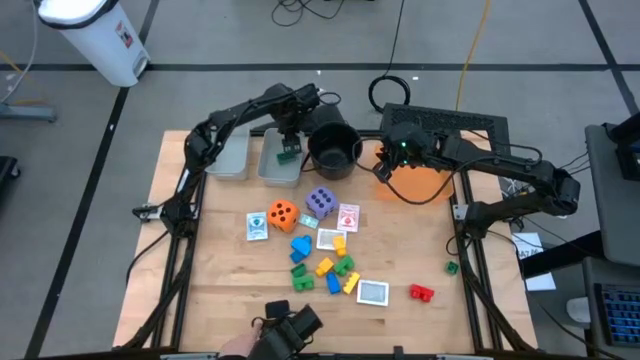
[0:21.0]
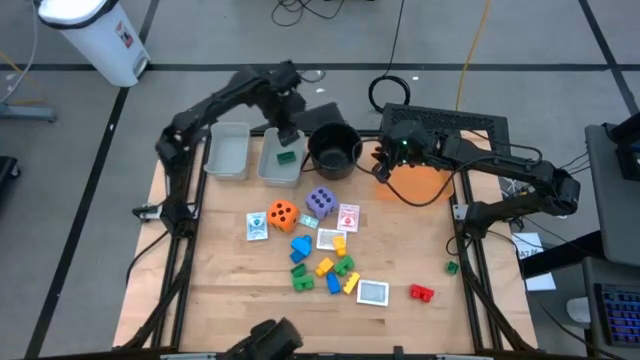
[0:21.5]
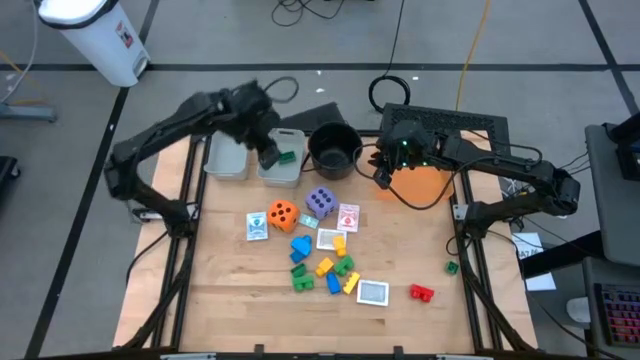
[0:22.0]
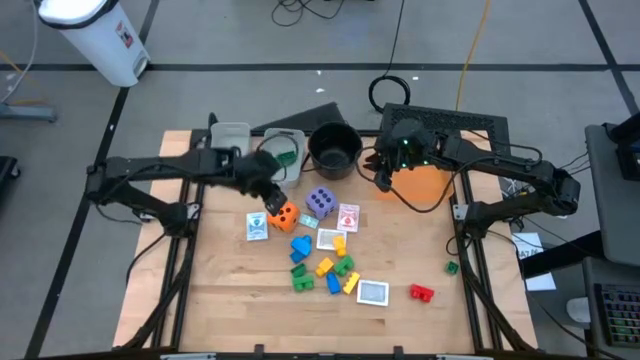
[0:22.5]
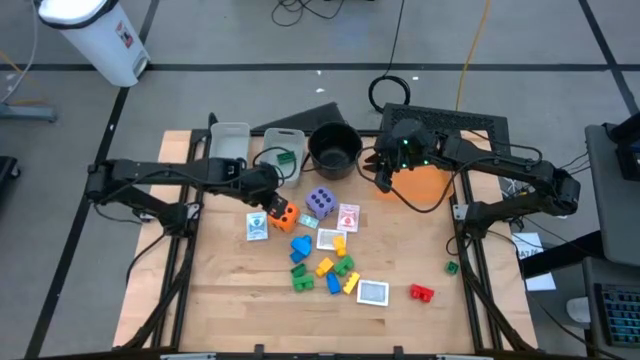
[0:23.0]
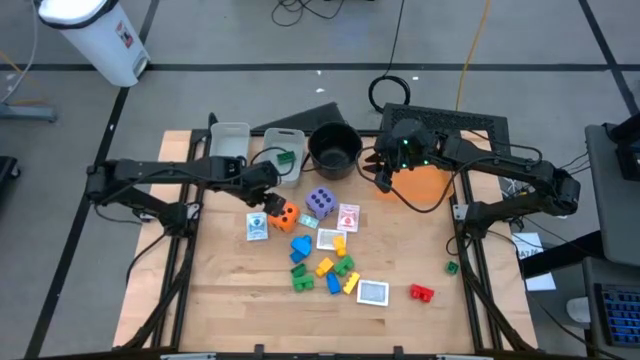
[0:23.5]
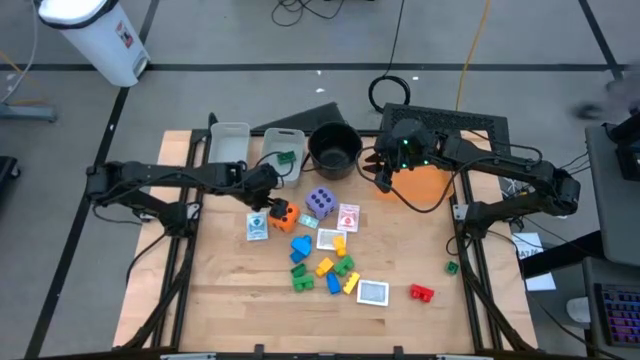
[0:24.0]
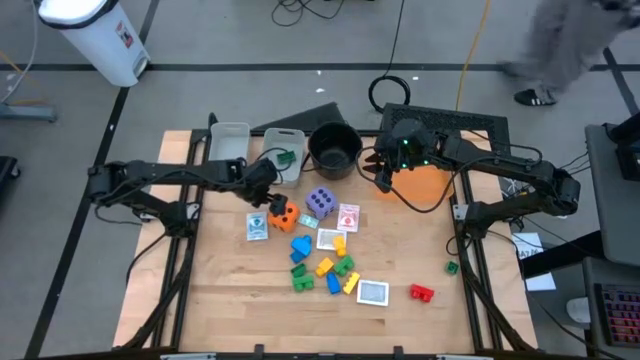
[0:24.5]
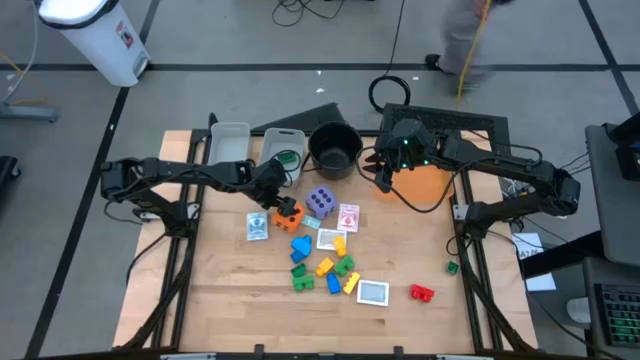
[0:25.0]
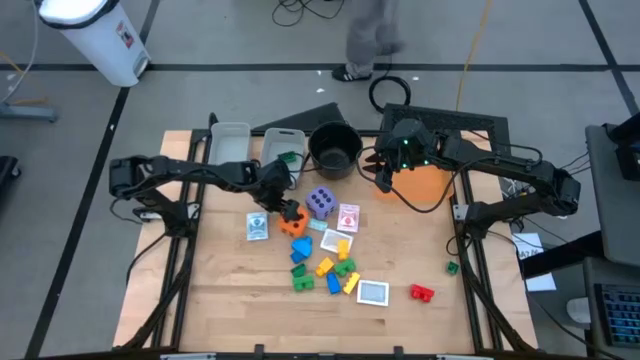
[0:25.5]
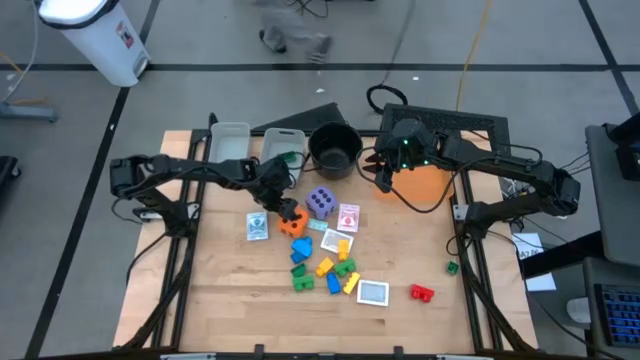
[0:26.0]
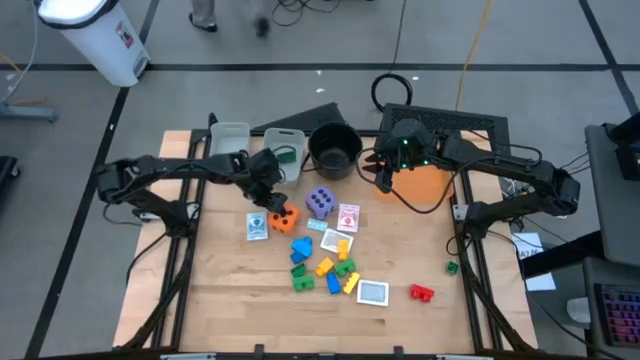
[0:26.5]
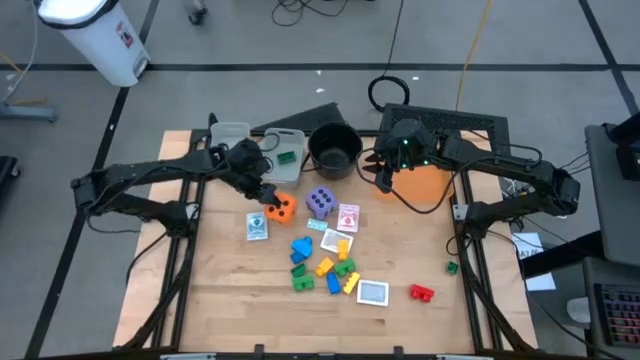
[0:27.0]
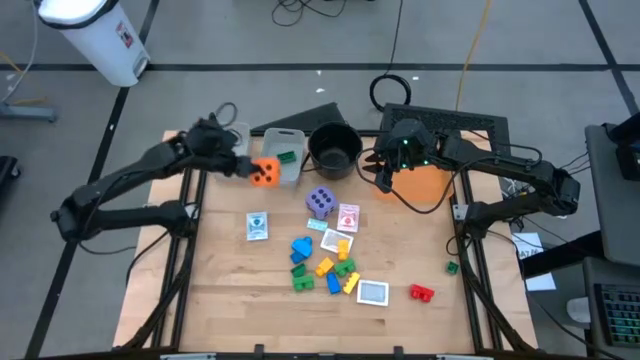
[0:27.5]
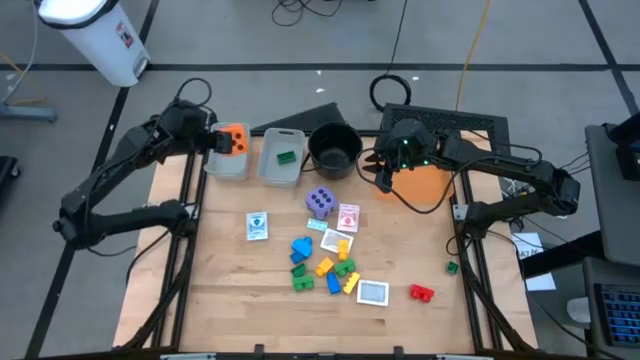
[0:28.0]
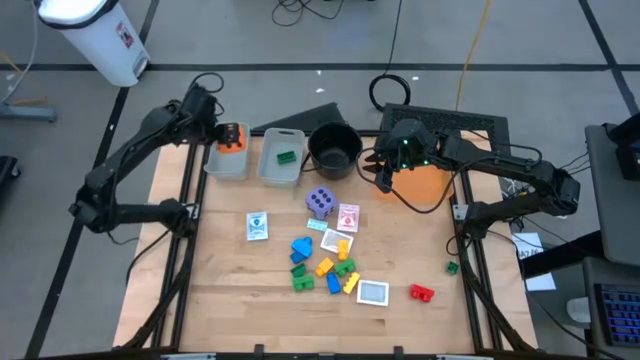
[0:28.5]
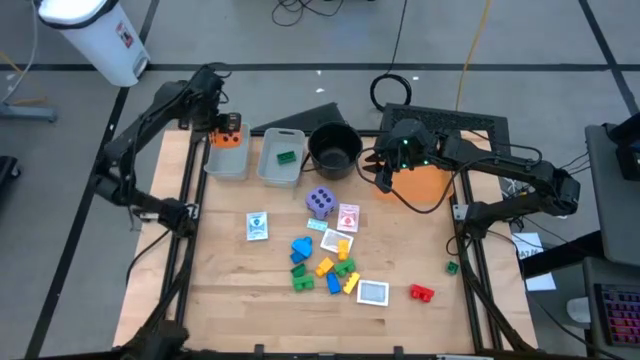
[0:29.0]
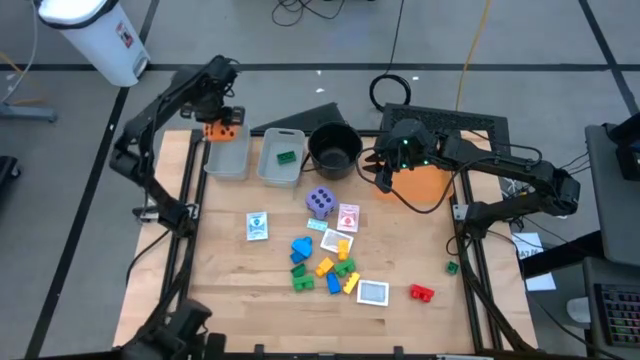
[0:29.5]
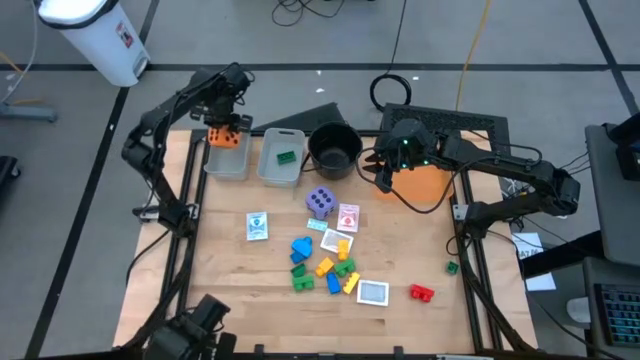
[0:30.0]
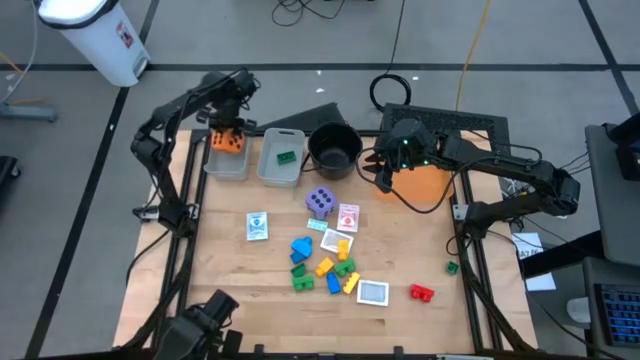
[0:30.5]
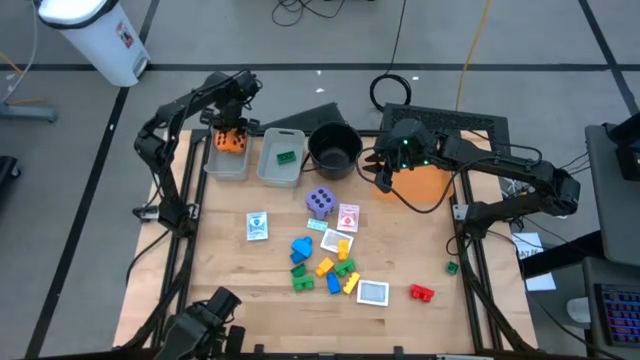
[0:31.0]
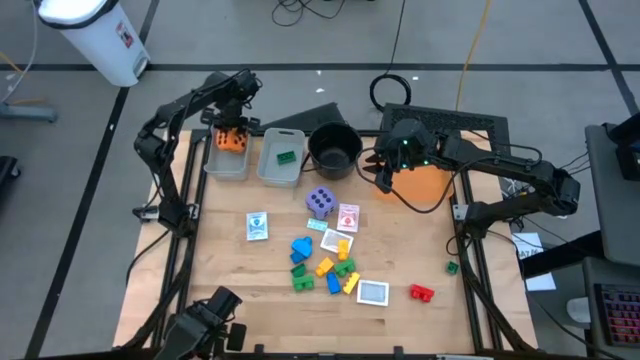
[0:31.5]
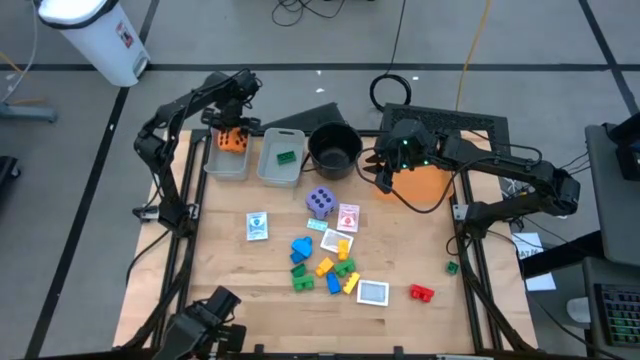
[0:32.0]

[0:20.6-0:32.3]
Task: Pick & Place Toys
Put the orange die into the left gray bin

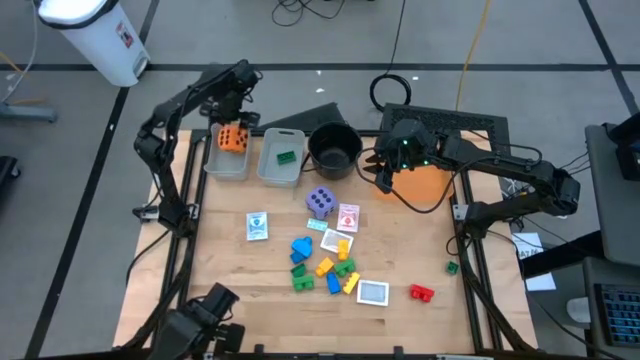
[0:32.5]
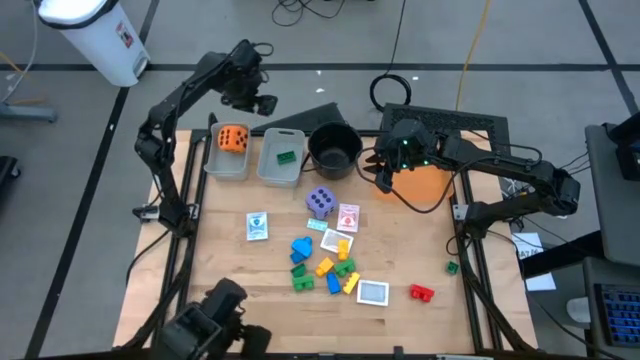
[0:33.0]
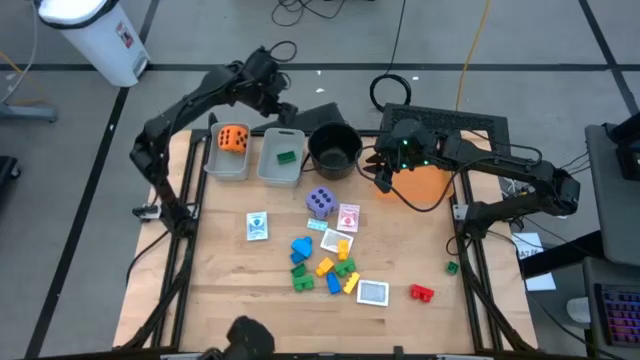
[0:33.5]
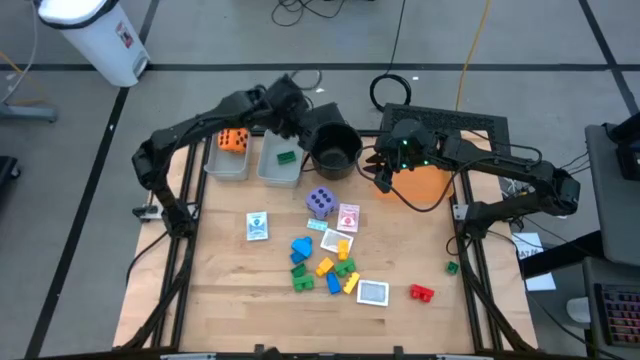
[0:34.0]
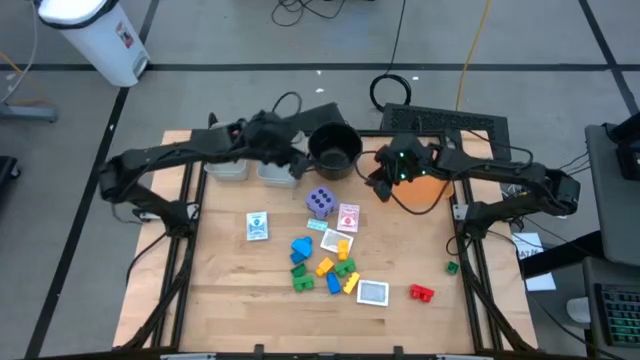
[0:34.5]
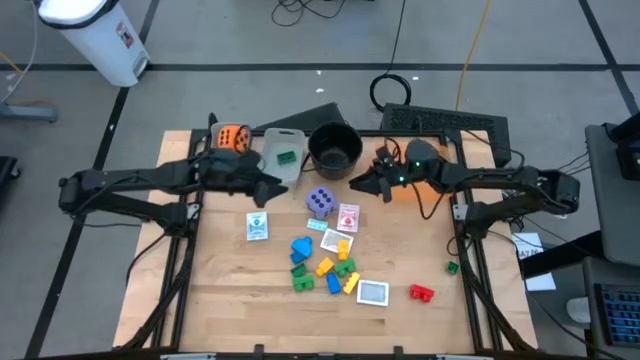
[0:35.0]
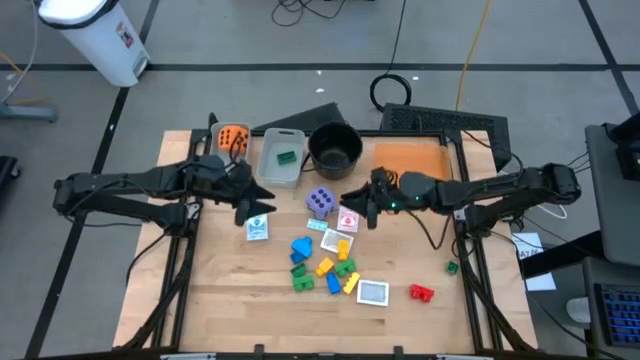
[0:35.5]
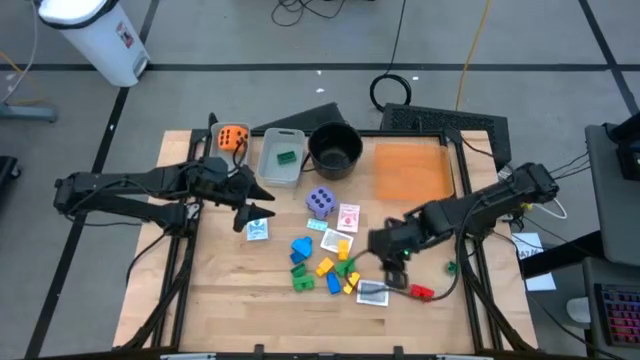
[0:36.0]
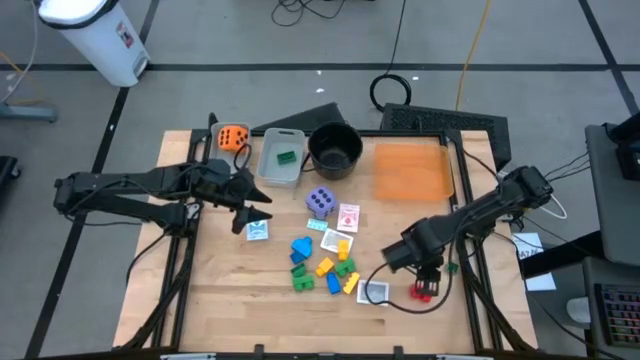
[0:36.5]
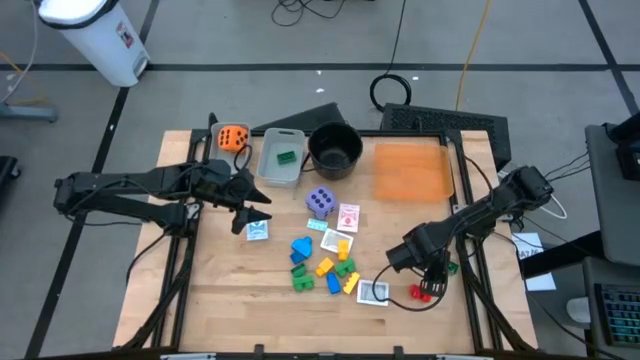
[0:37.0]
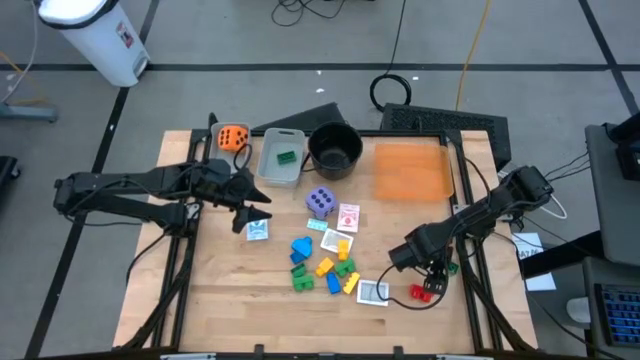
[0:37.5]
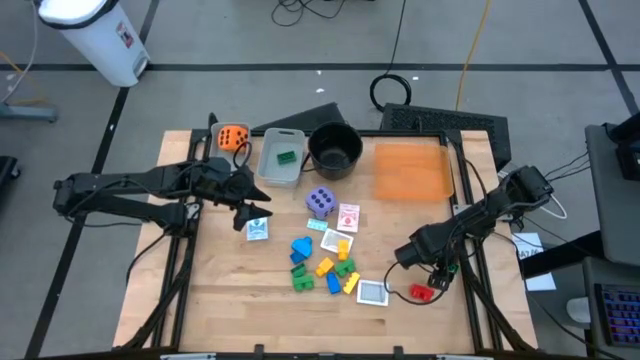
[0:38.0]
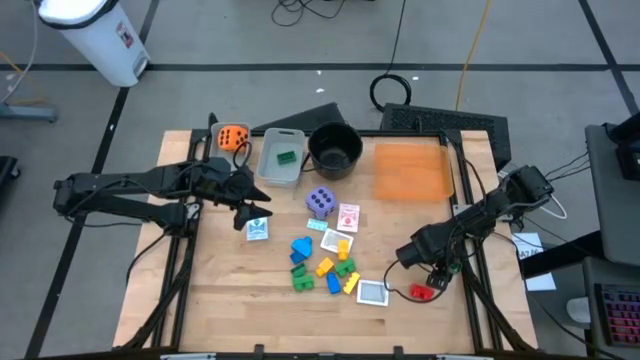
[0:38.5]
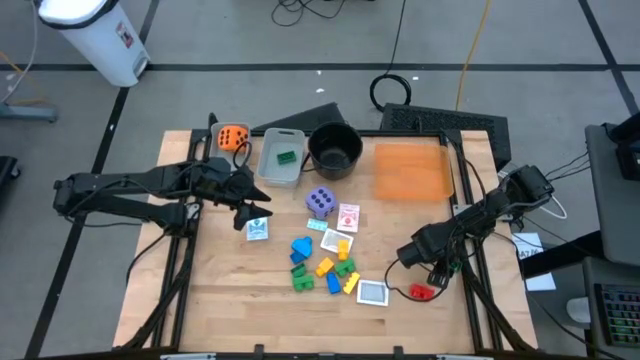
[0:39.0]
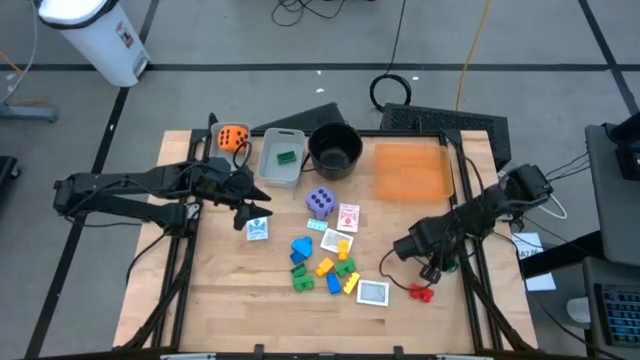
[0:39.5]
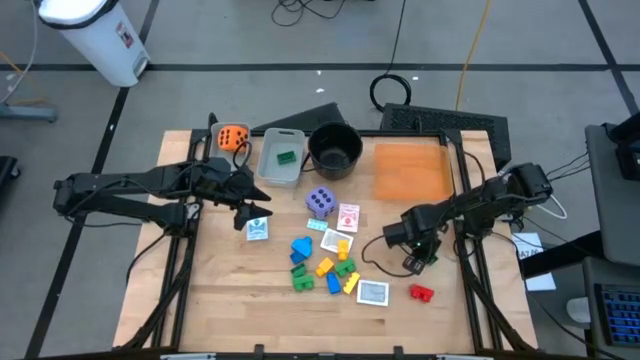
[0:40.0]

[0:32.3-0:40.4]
Put the green game piece into the right gray bin

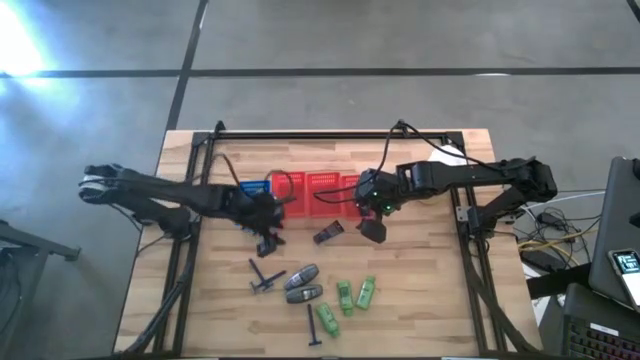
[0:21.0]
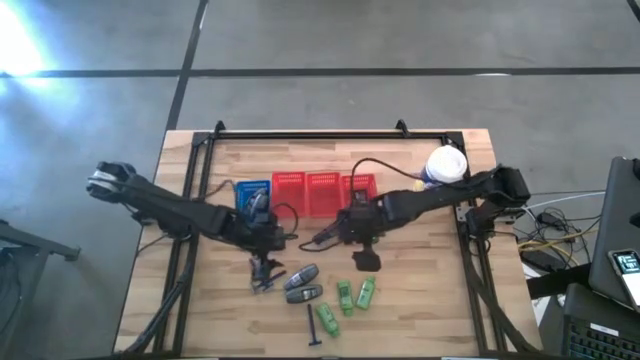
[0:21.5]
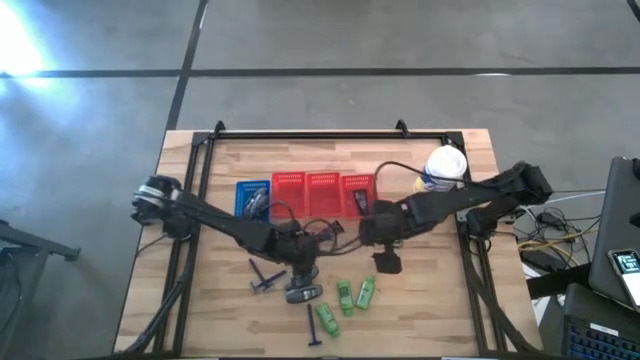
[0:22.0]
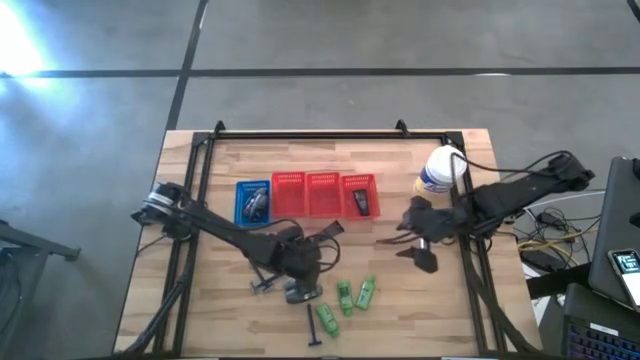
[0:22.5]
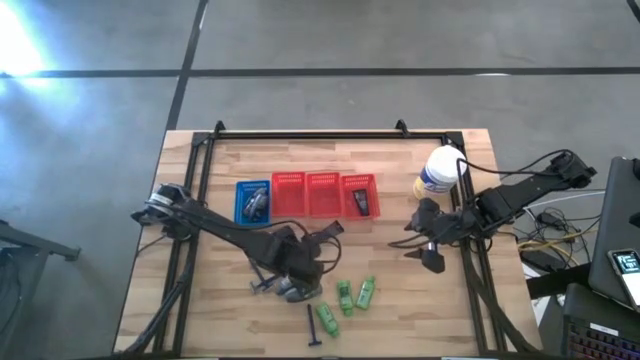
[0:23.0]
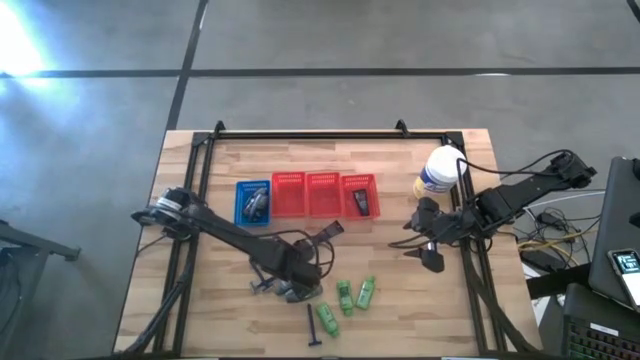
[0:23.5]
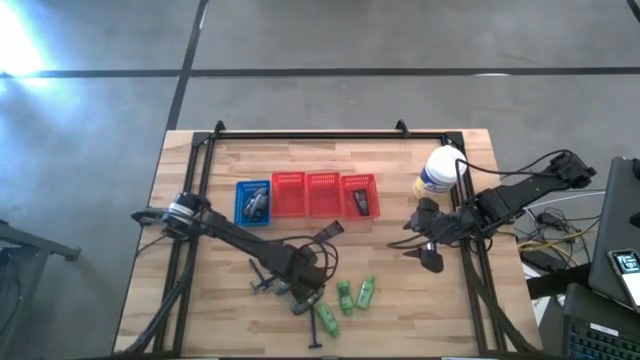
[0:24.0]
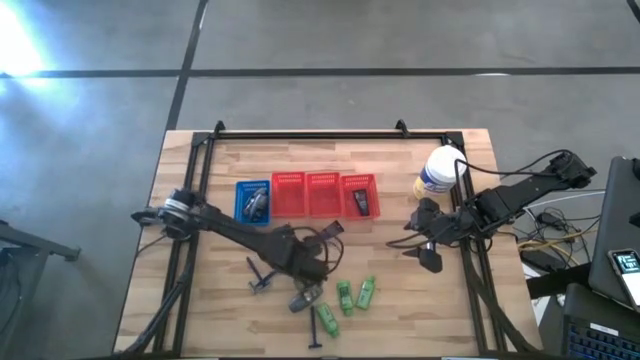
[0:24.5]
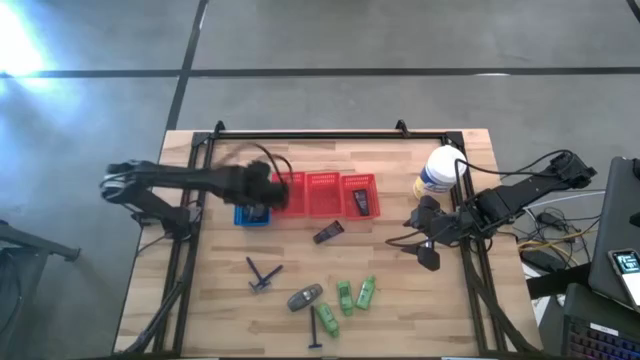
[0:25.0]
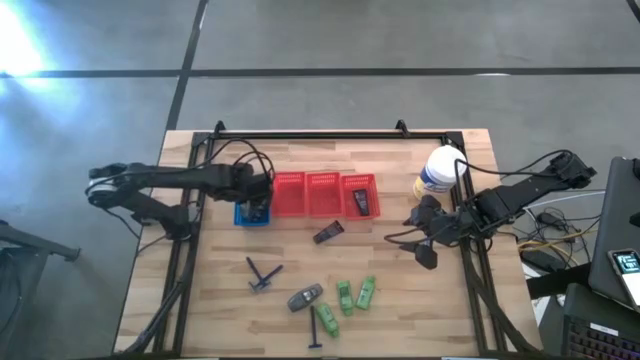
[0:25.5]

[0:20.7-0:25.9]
Task: Pick & Place Travel size toiletries
Put the gray deodorant into the blue bin
